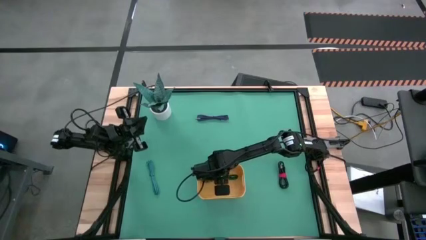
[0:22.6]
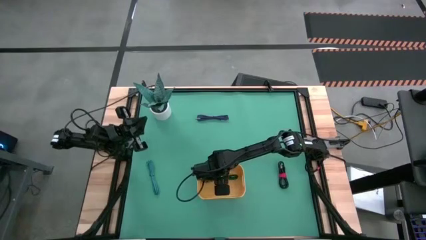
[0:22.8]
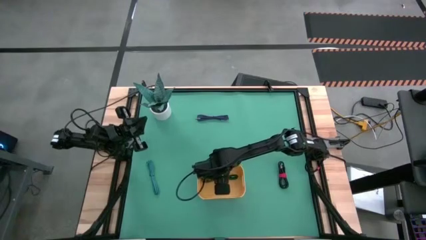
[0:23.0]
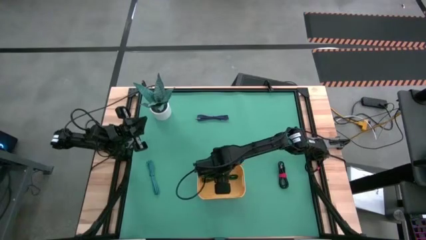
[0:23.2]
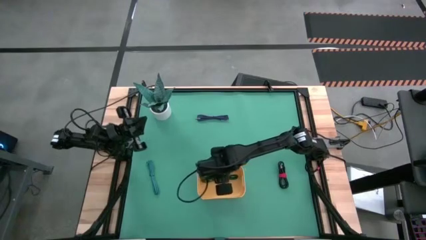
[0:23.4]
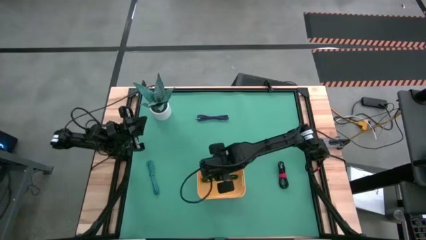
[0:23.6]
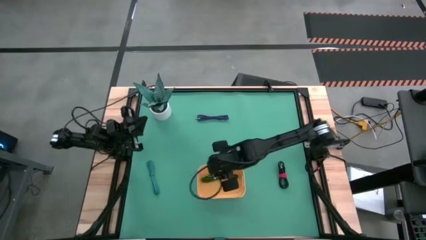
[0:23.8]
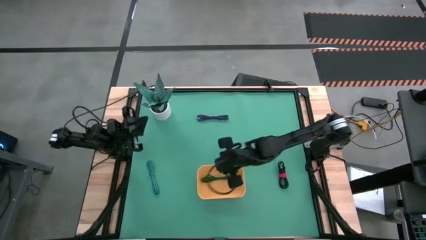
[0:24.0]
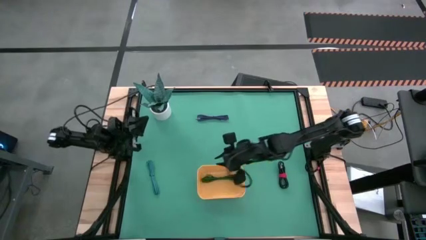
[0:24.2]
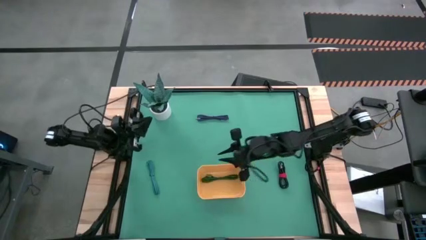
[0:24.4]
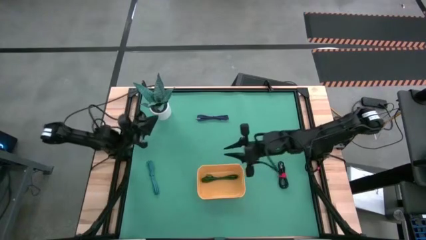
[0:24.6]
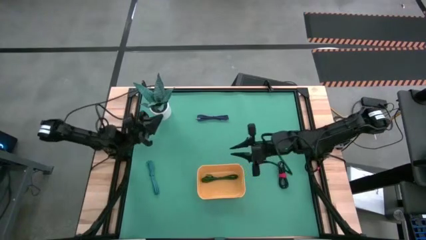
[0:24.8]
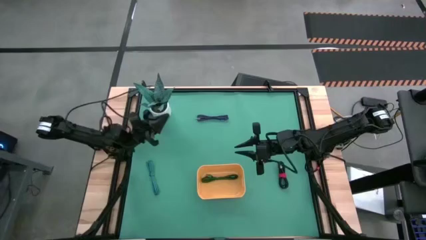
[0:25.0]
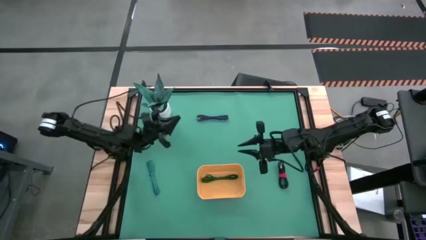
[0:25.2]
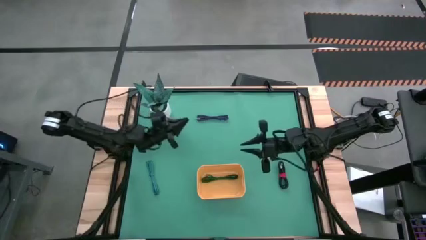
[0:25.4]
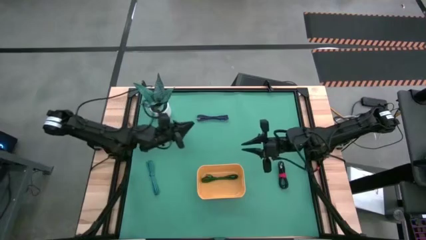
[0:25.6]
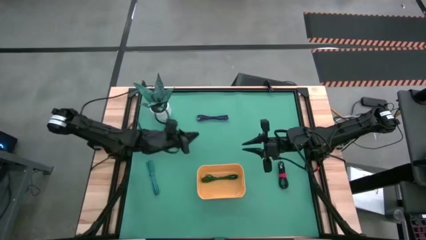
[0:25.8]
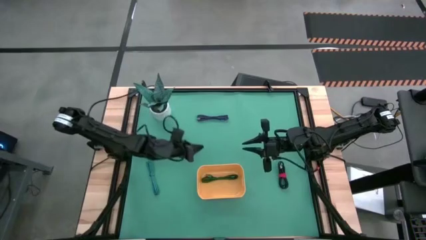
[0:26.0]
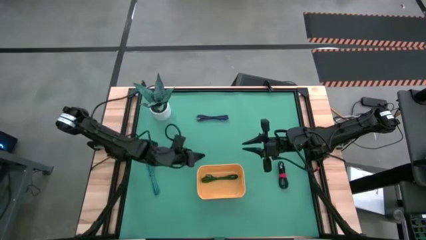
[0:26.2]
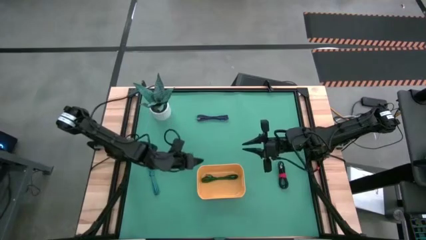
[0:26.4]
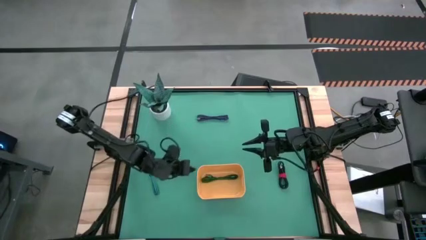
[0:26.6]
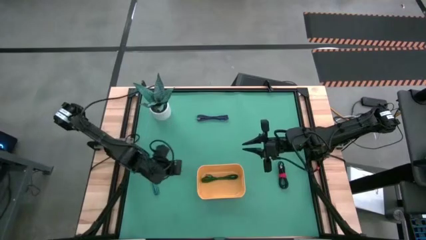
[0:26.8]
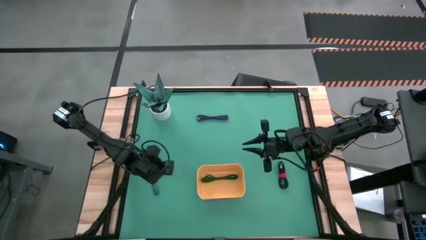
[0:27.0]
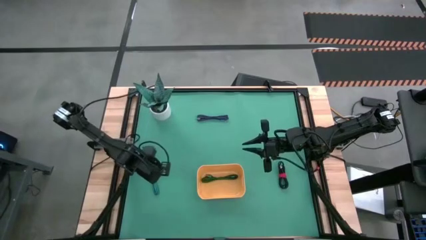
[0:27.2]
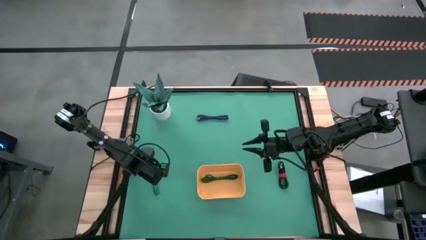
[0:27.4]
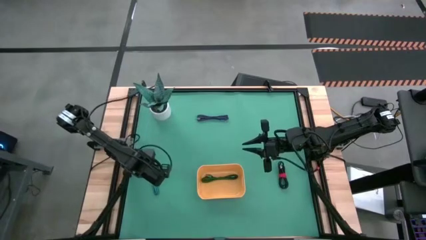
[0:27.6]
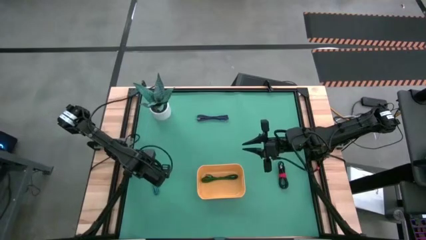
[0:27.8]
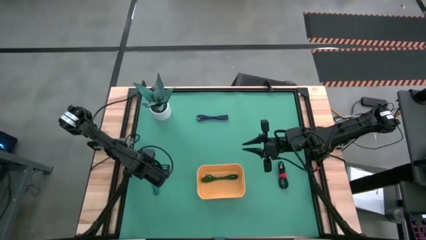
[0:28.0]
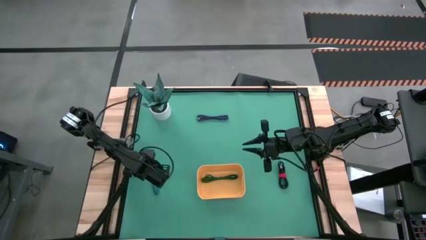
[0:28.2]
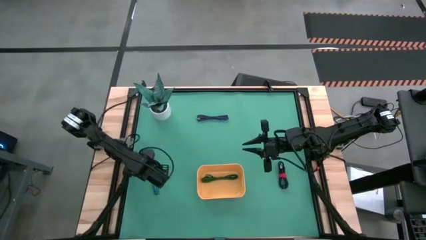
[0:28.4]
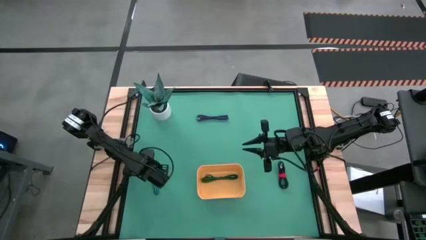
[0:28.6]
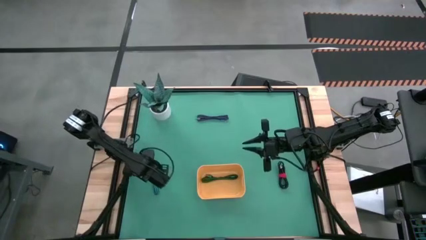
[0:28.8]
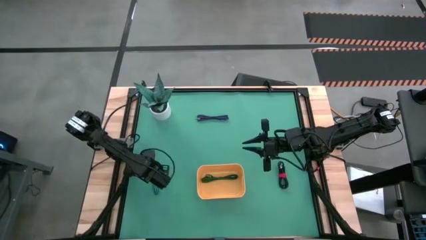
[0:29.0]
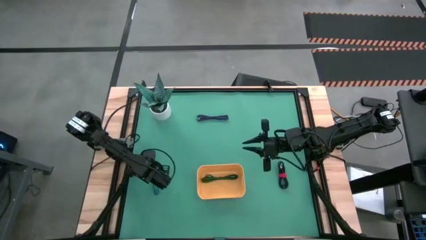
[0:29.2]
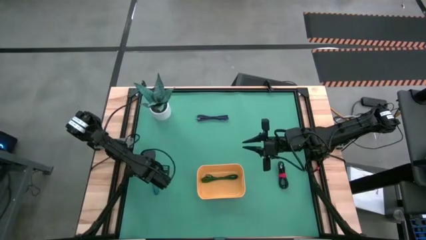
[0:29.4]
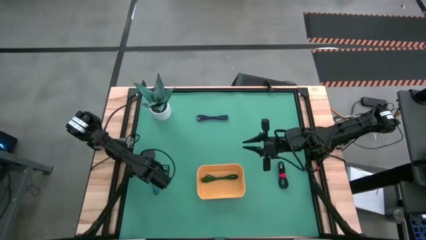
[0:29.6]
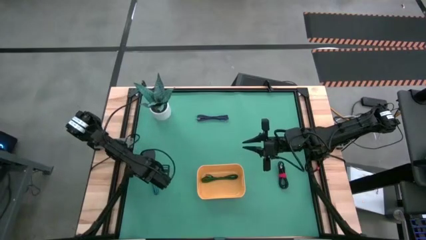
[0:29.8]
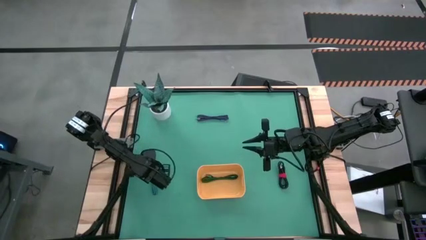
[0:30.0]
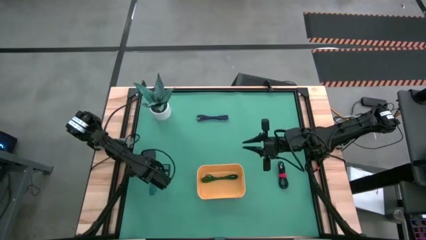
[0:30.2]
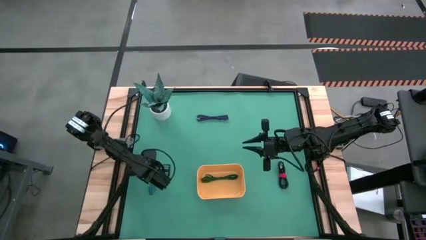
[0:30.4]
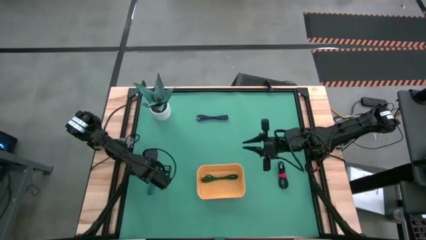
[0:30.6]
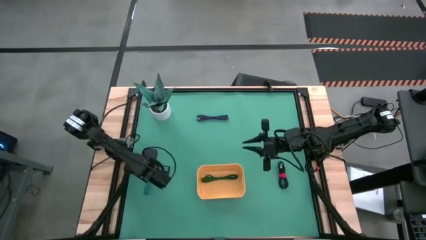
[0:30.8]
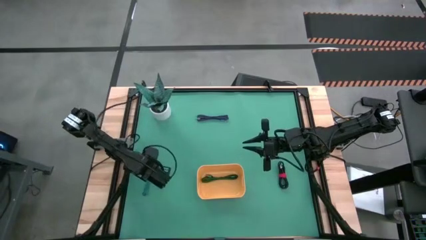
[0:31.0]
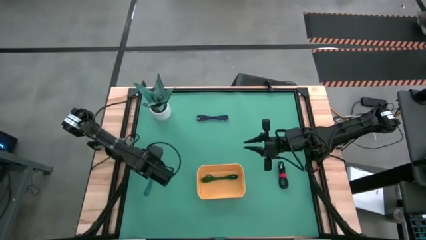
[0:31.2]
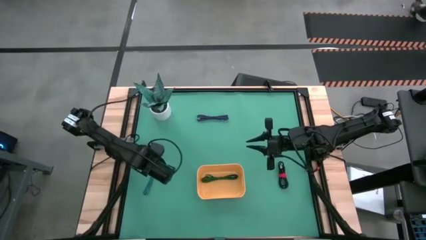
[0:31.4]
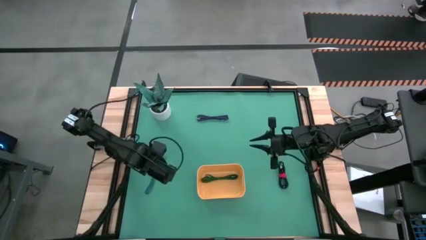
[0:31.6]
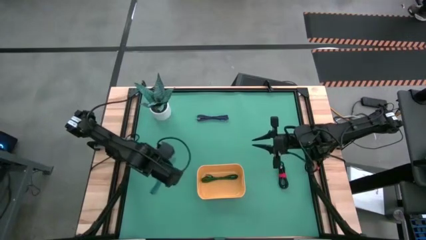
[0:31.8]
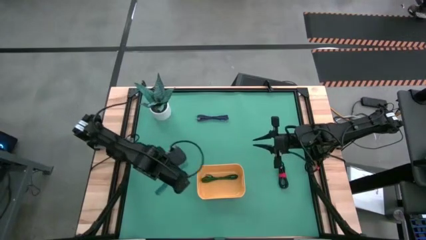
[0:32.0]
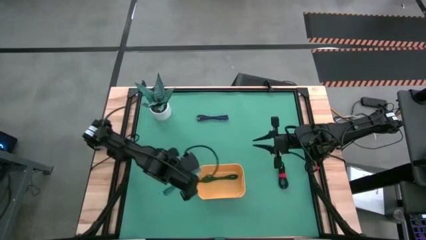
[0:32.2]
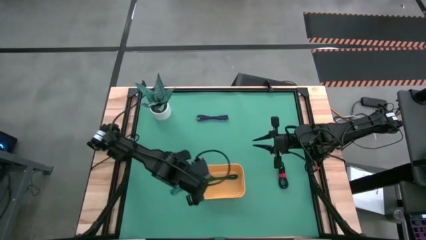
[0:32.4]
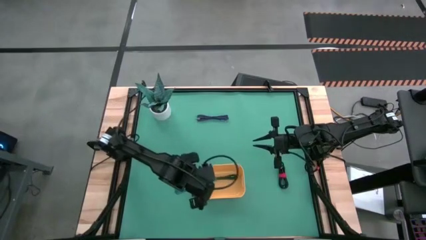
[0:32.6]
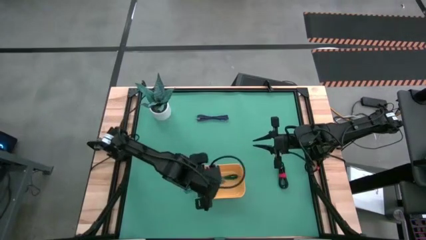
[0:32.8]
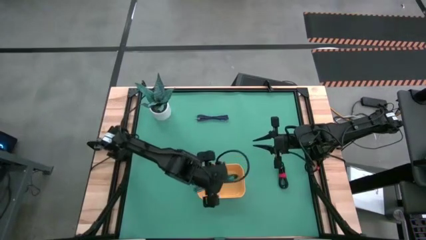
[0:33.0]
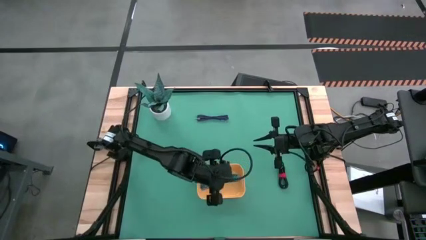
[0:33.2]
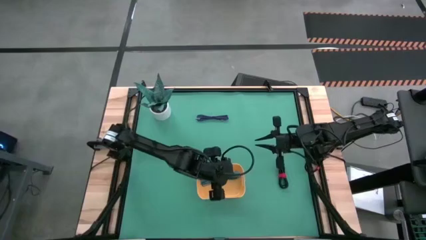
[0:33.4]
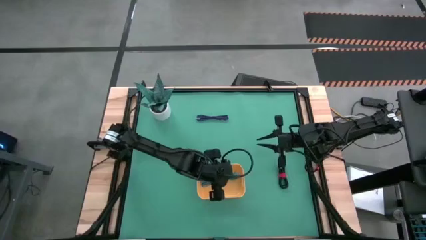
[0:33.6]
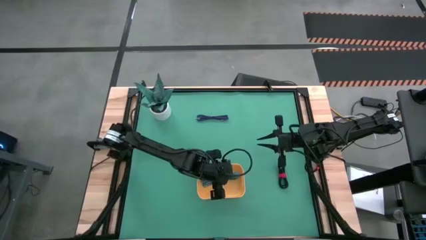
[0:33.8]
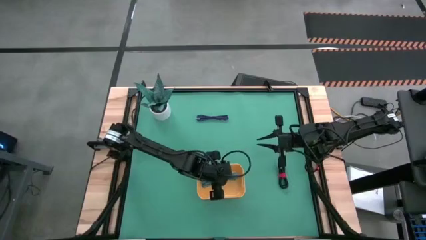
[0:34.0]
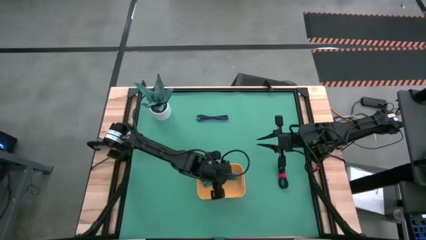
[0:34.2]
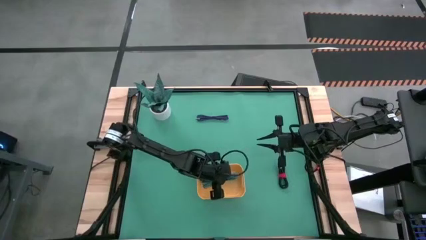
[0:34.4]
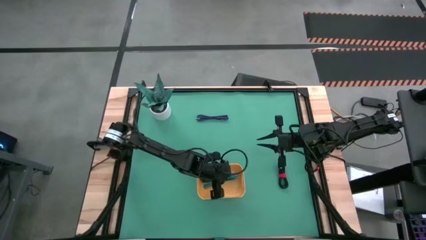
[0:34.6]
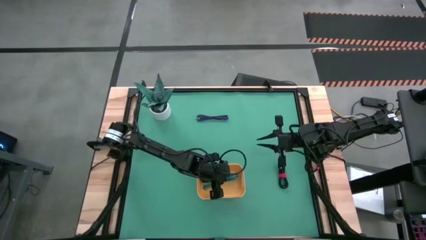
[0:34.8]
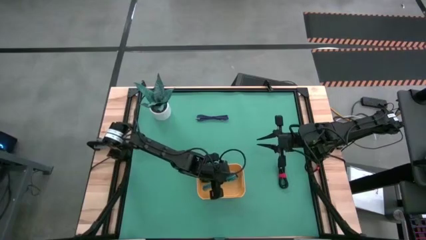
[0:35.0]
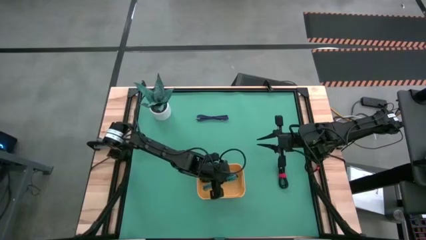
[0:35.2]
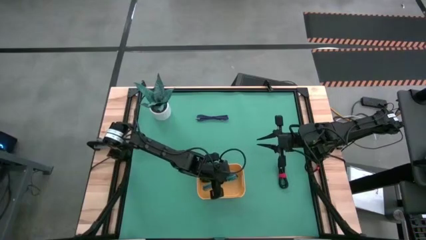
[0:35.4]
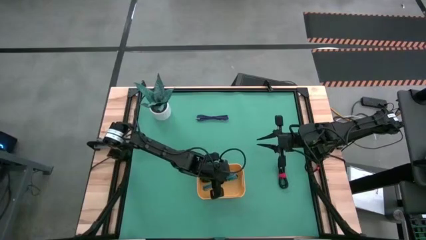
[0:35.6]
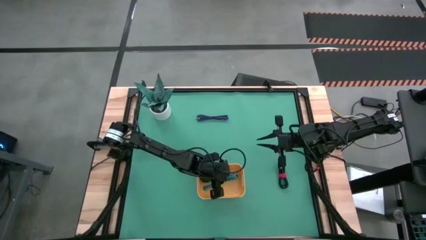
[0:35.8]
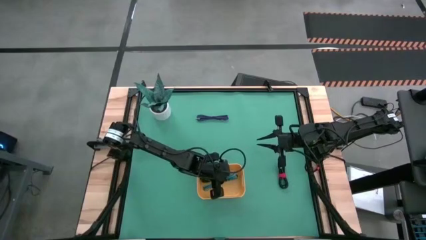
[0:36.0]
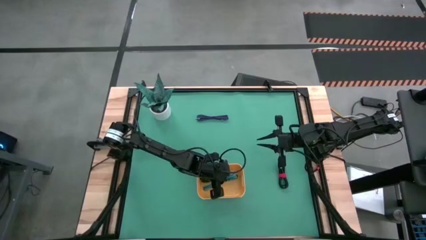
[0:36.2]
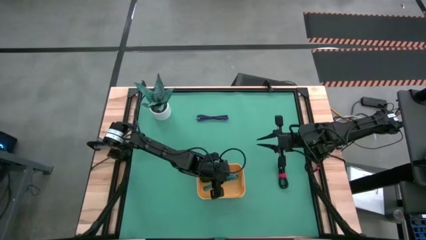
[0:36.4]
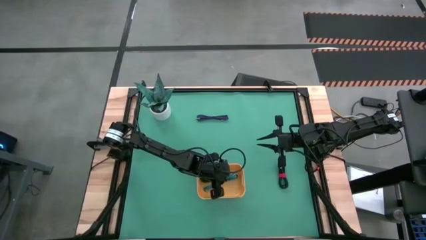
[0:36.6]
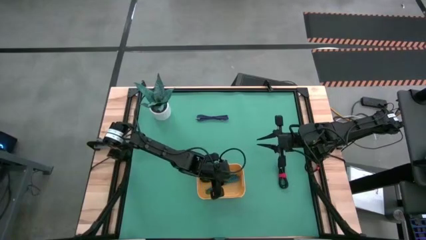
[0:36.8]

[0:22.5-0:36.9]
Task: Pick and place USB-C Cables
Put the blue charger cable into the yellow bin
